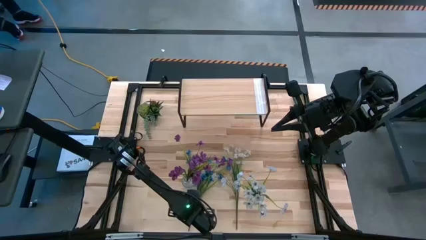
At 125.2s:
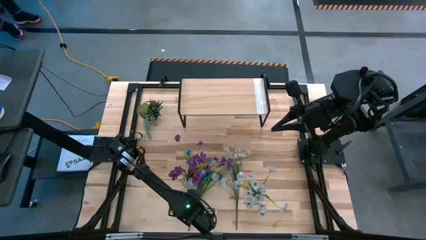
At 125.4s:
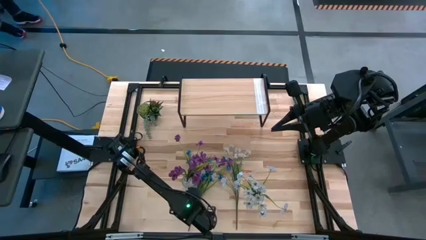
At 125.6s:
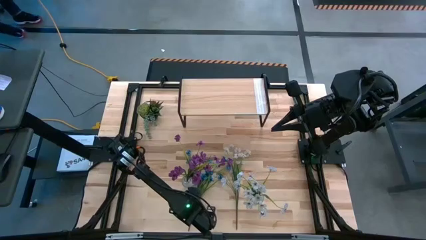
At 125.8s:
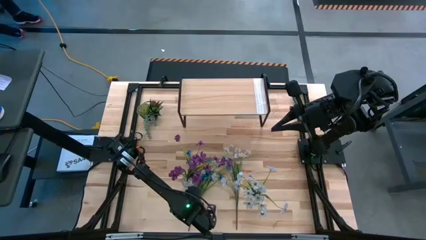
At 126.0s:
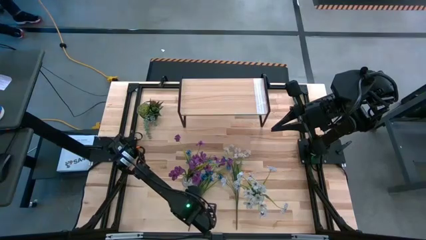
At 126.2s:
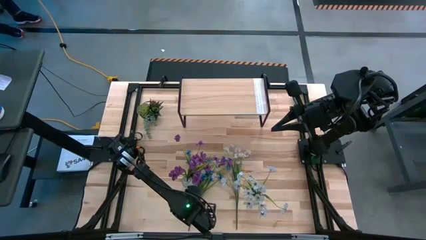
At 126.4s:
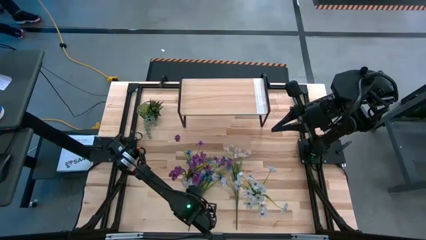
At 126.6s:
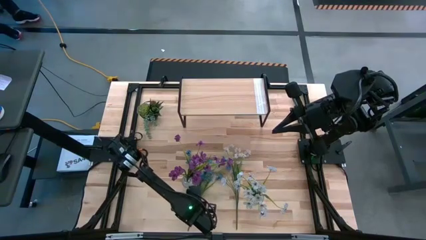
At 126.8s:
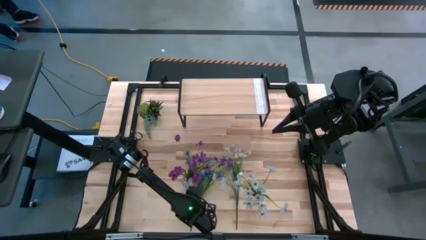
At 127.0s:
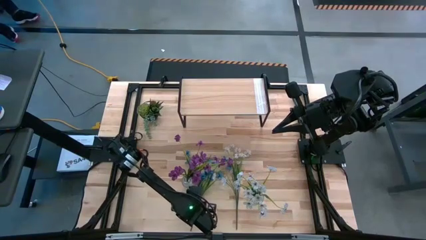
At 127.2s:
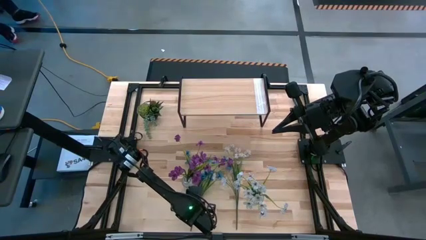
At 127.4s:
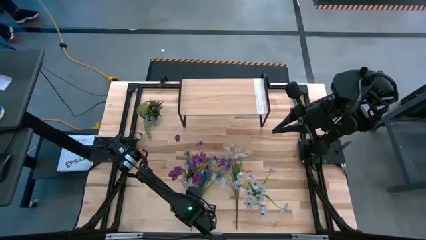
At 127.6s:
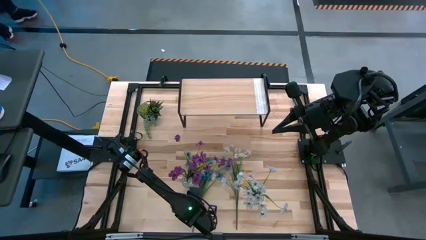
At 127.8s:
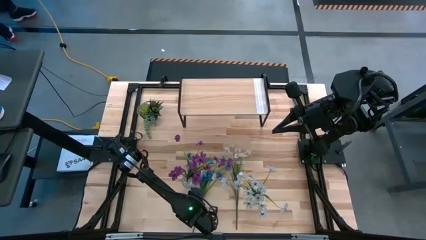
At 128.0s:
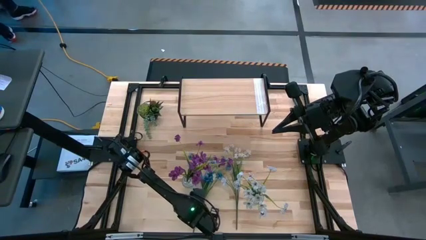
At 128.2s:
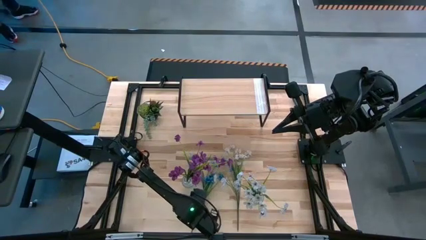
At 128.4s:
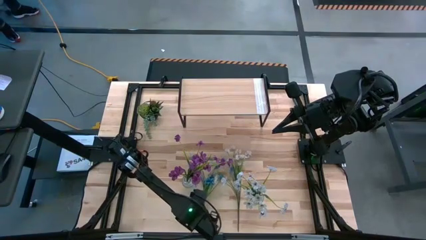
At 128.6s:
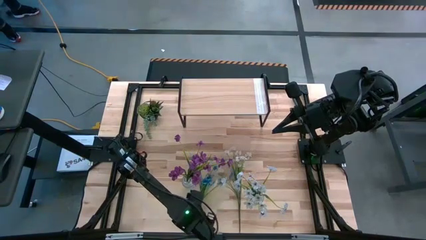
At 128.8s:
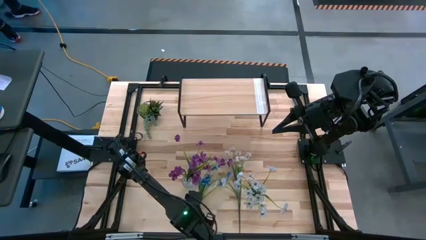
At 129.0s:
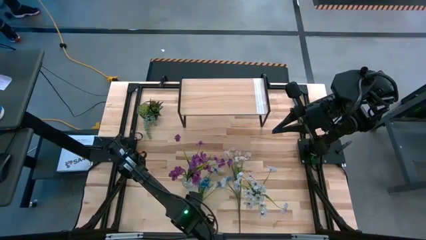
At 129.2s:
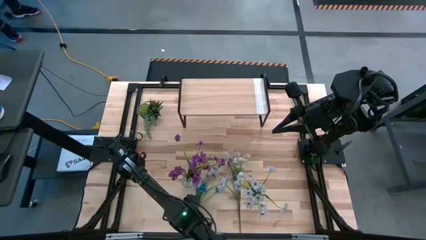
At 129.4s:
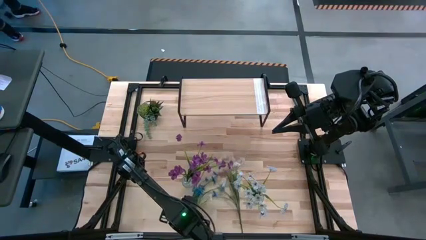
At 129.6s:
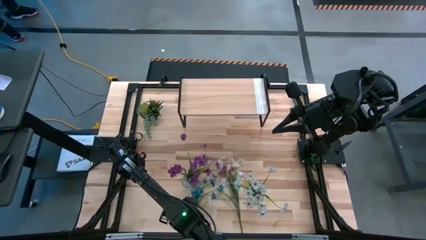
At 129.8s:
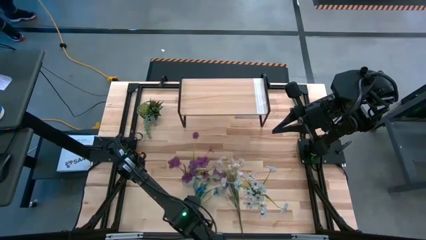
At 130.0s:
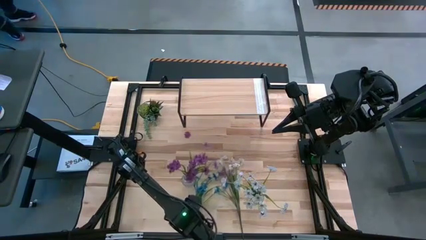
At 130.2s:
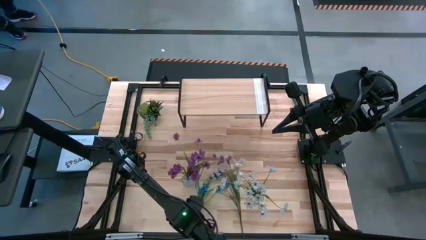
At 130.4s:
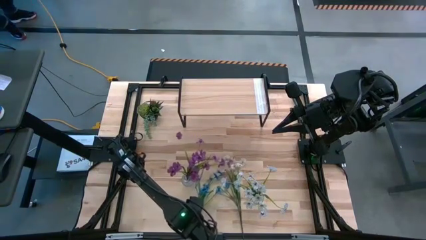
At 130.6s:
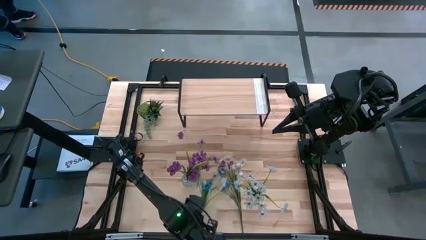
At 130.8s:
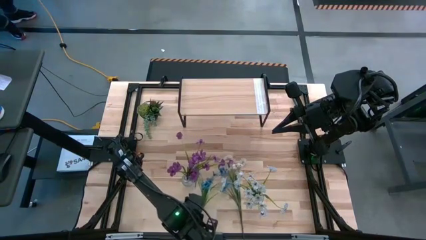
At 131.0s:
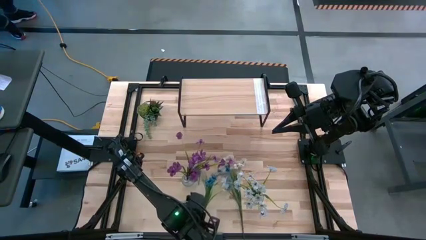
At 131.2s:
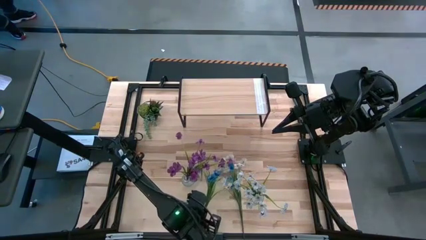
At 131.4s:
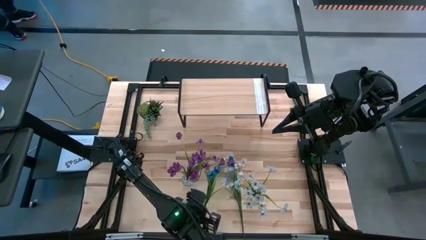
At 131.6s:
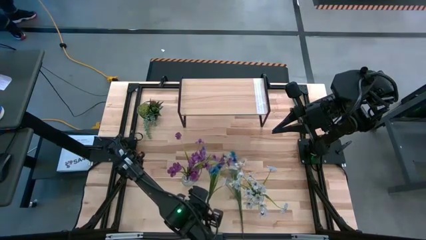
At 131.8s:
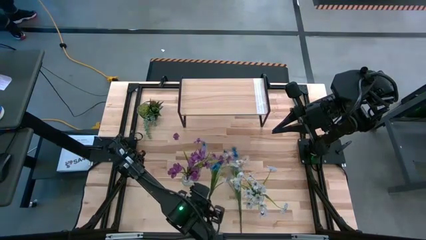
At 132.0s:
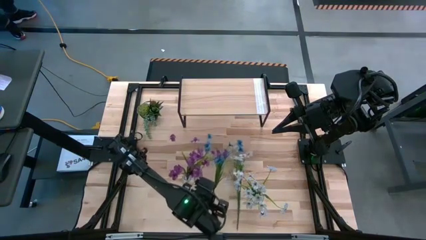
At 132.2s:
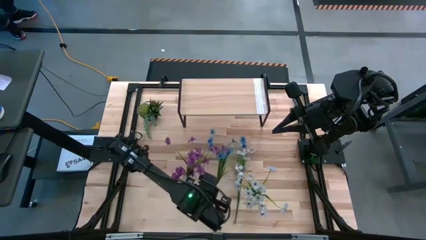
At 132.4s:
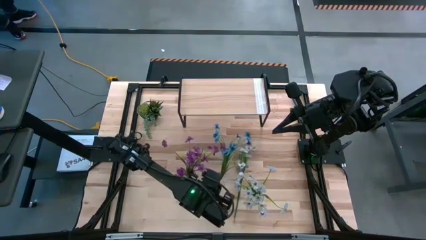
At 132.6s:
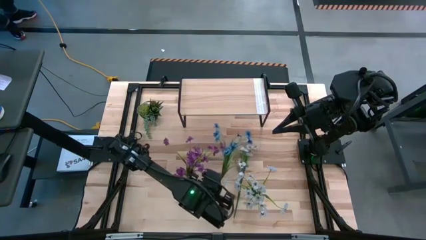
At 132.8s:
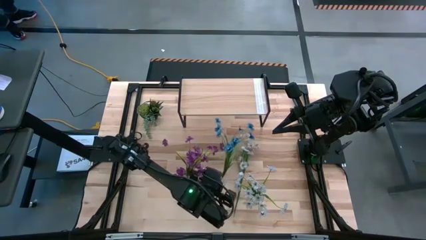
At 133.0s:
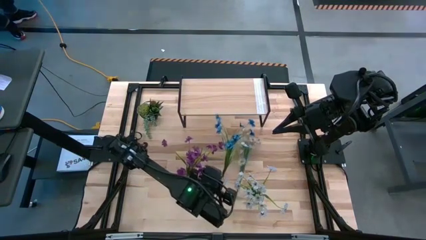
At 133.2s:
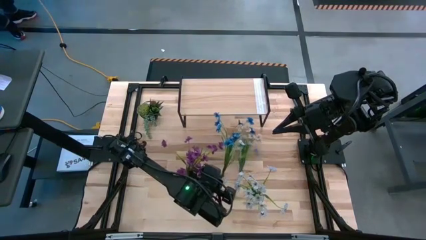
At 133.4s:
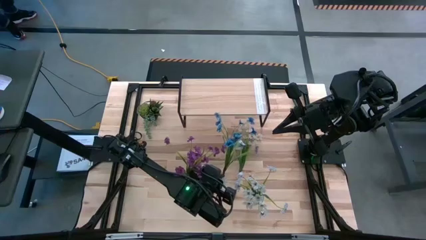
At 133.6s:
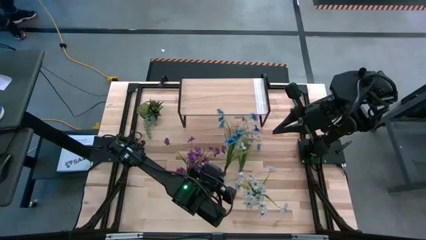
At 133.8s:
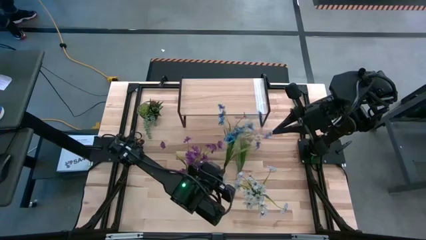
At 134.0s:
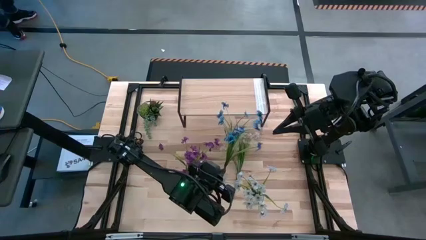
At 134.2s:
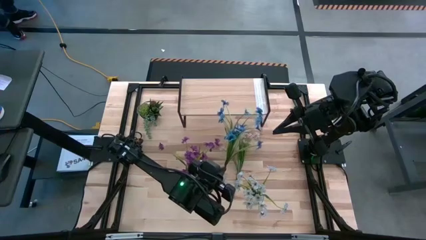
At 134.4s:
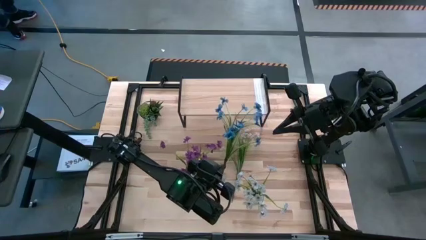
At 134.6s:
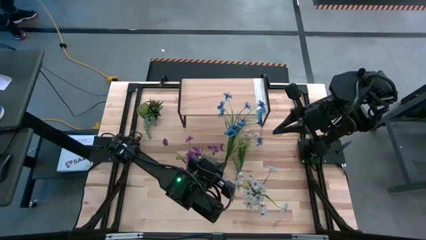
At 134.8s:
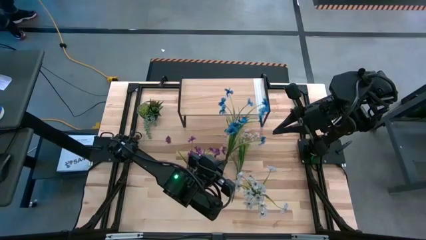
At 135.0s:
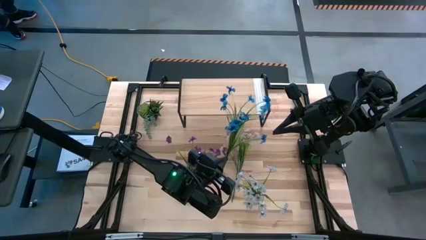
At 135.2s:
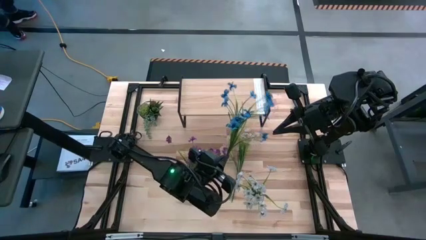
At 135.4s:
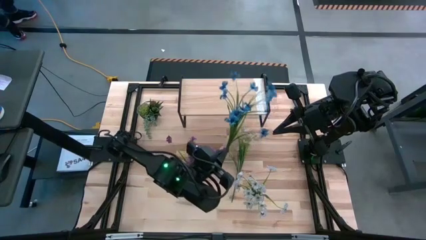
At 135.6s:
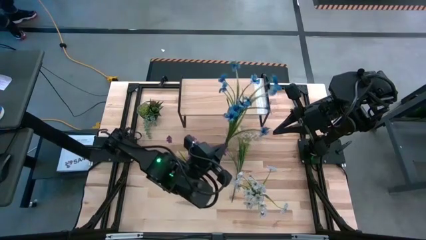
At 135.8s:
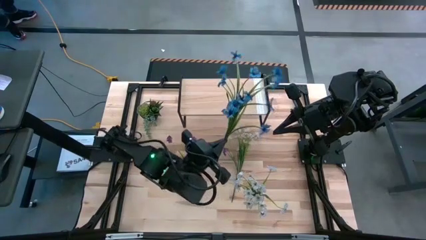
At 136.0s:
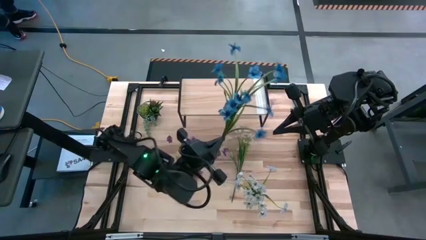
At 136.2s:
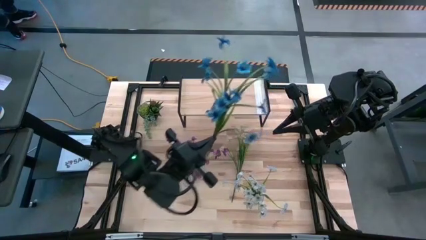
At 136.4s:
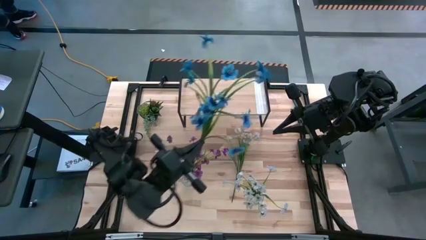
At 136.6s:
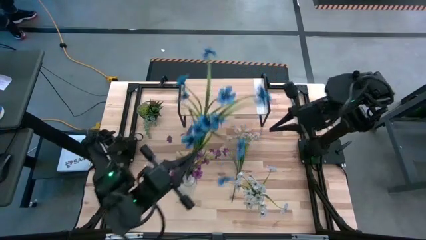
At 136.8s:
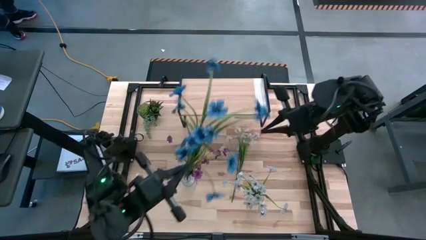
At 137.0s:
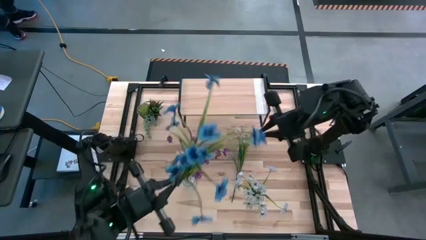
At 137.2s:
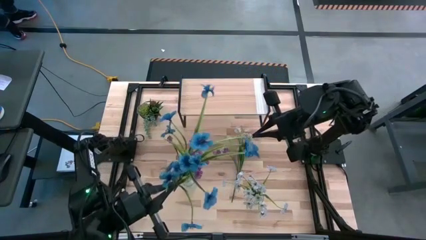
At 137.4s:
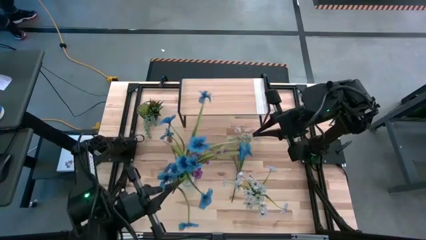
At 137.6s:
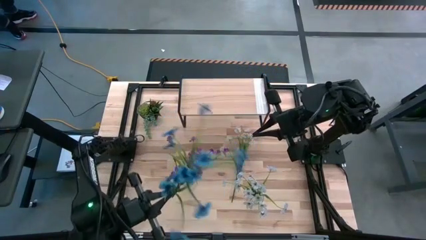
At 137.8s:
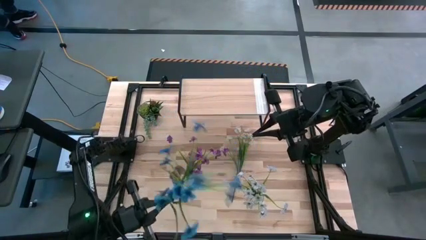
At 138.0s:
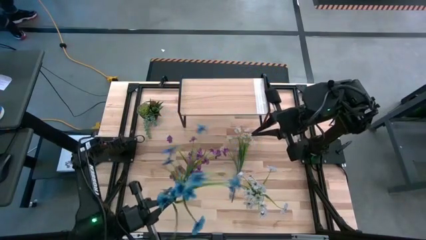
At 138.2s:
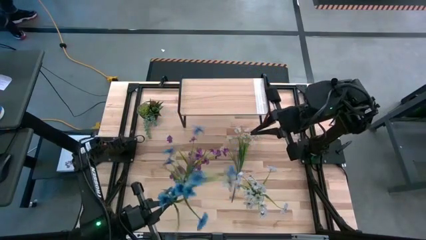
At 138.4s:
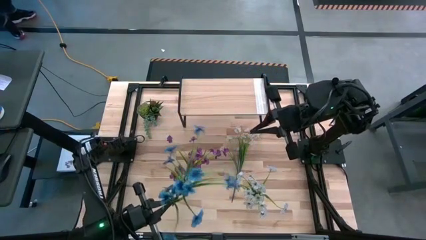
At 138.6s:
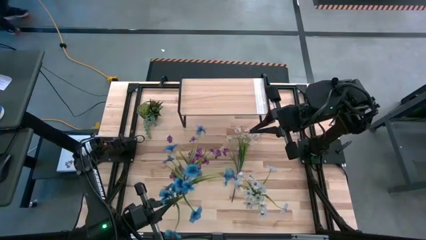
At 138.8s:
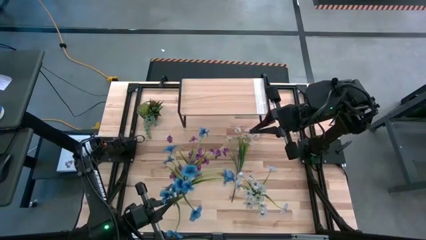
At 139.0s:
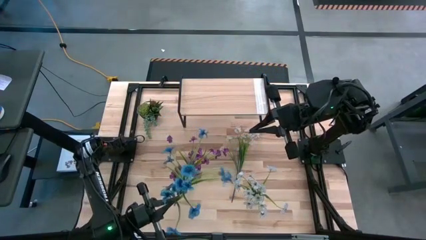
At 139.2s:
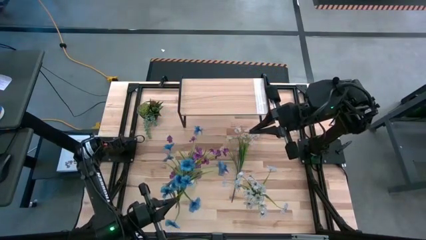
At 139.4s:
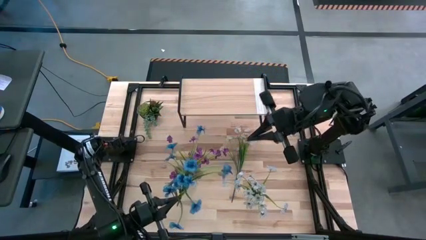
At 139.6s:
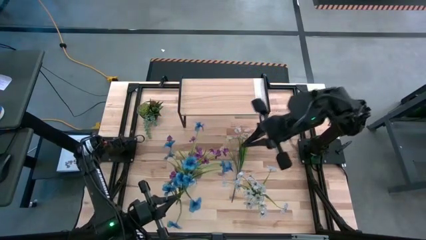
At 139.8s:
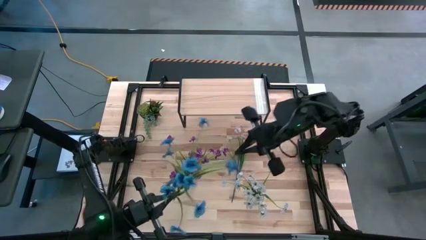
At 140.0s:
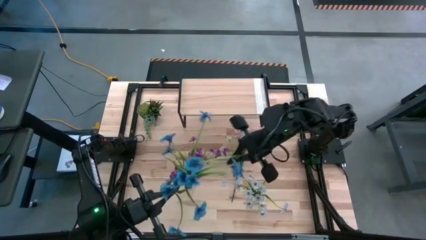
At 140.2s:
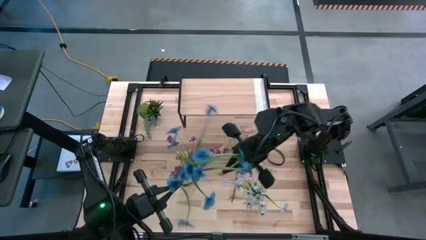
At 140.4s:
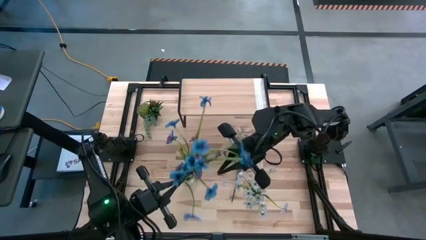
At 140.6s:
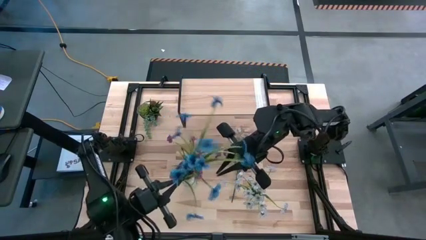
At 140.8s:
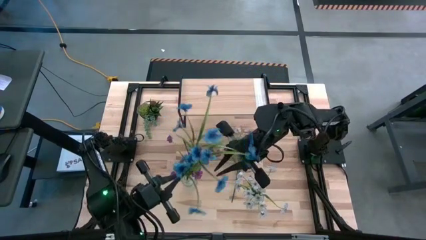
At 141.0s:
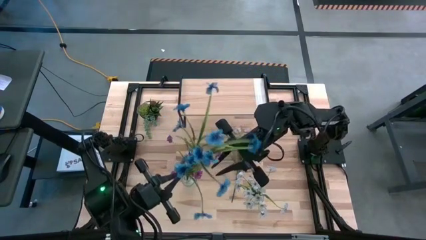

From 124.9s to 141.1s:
Task: Pick and place flowers into a vace then onto a shelf
Put the blue flowers into the left transparent vase
